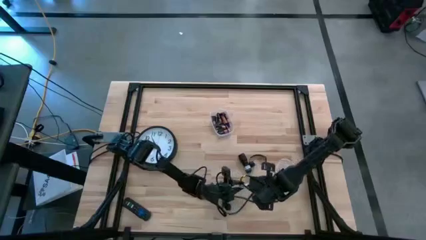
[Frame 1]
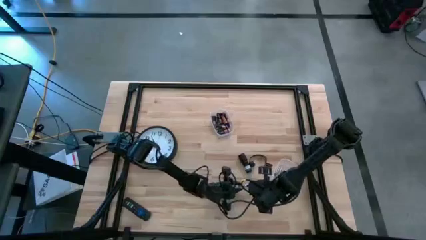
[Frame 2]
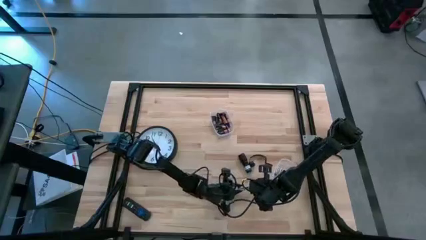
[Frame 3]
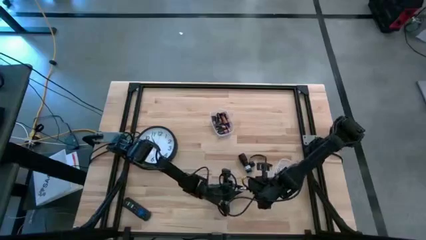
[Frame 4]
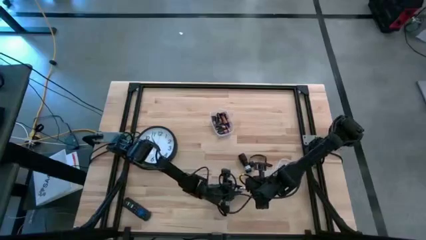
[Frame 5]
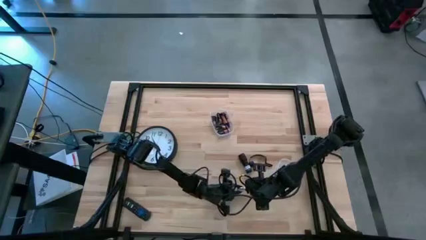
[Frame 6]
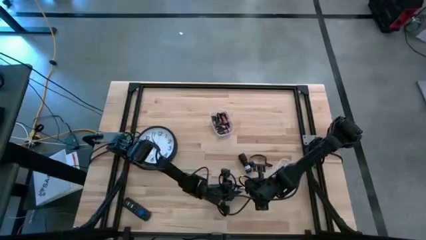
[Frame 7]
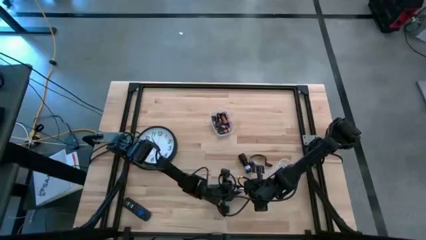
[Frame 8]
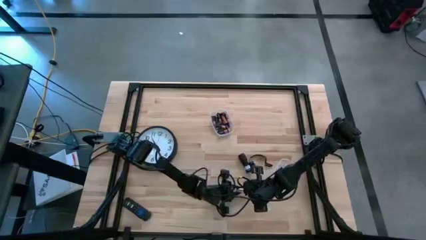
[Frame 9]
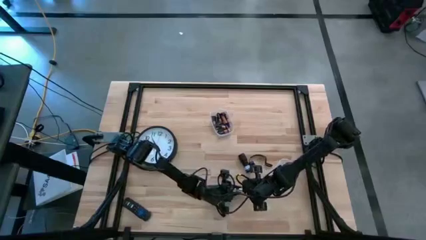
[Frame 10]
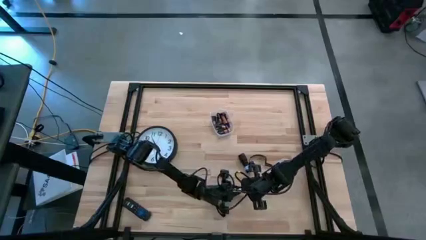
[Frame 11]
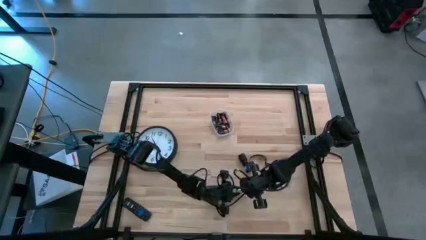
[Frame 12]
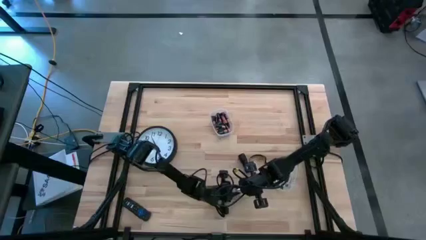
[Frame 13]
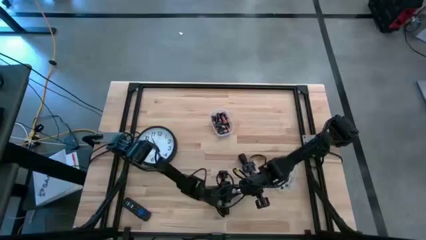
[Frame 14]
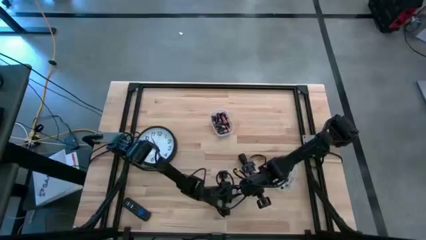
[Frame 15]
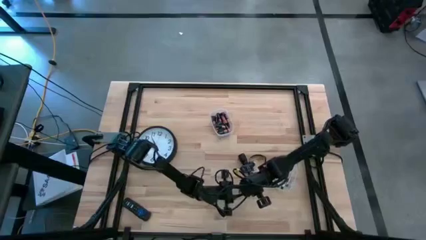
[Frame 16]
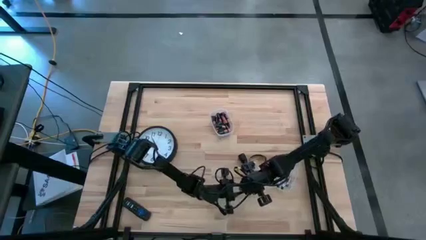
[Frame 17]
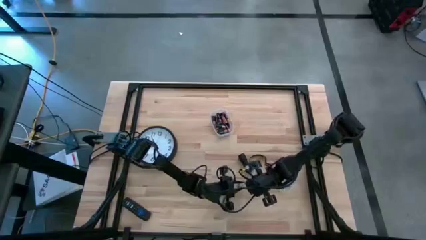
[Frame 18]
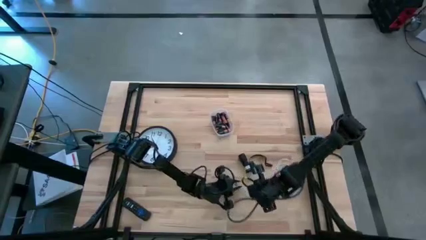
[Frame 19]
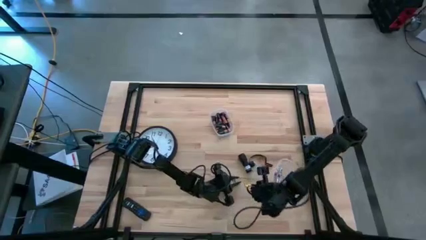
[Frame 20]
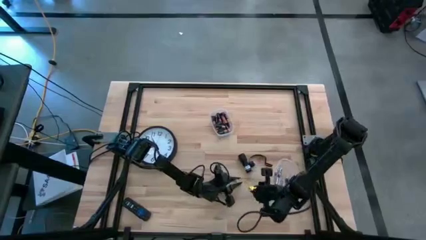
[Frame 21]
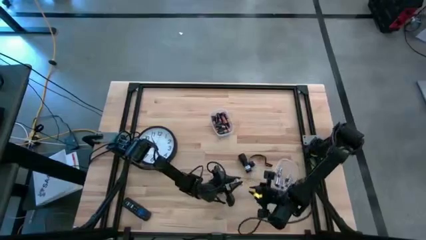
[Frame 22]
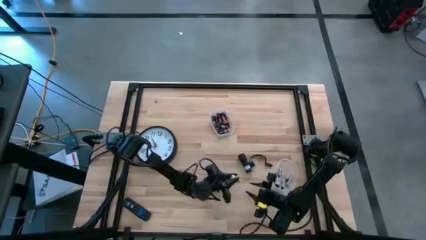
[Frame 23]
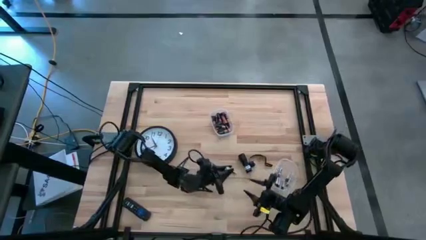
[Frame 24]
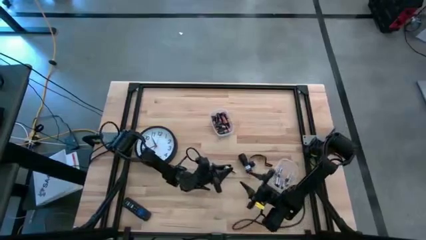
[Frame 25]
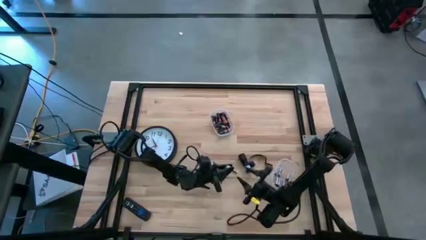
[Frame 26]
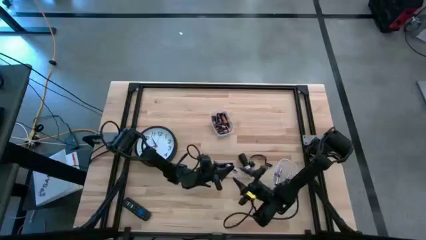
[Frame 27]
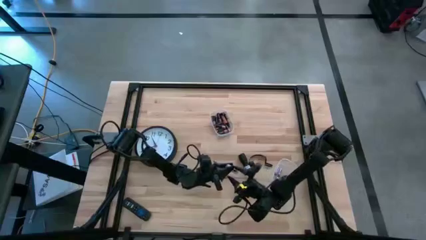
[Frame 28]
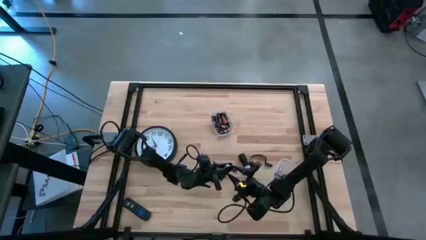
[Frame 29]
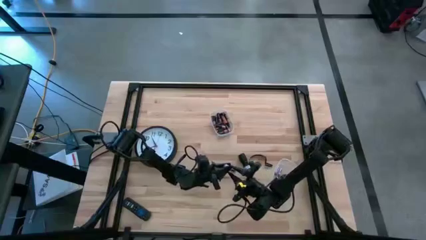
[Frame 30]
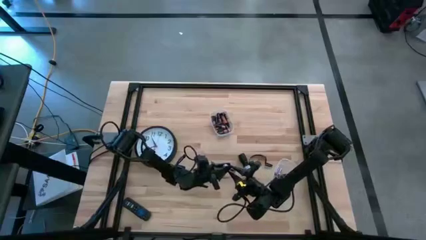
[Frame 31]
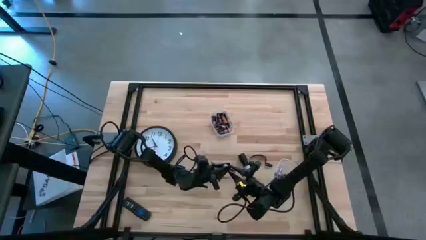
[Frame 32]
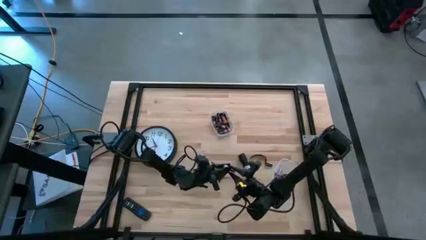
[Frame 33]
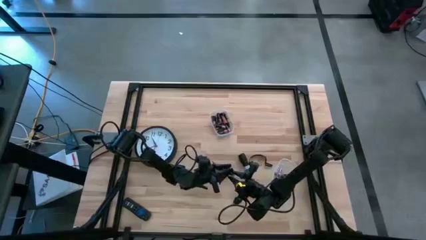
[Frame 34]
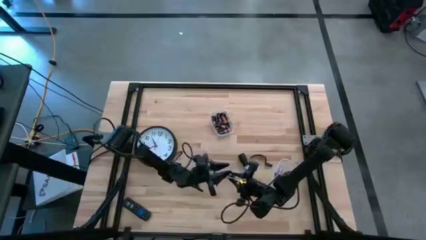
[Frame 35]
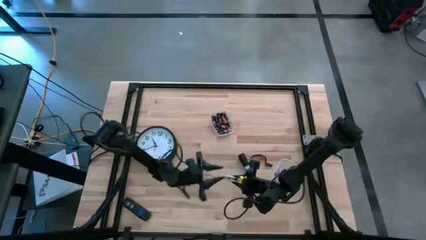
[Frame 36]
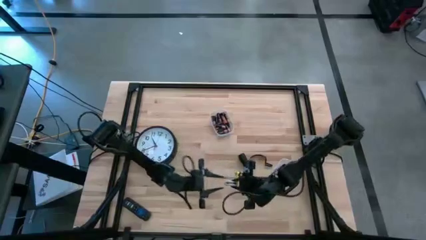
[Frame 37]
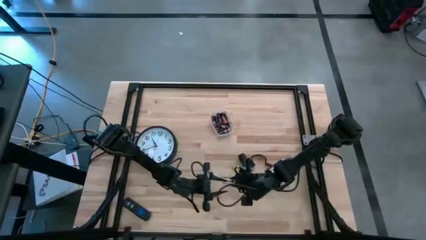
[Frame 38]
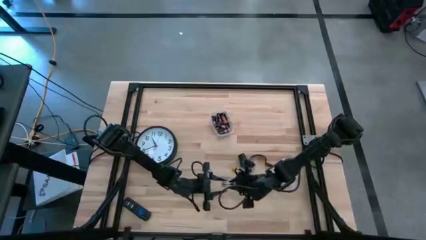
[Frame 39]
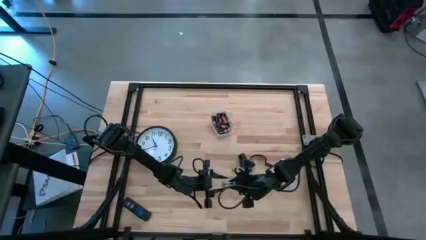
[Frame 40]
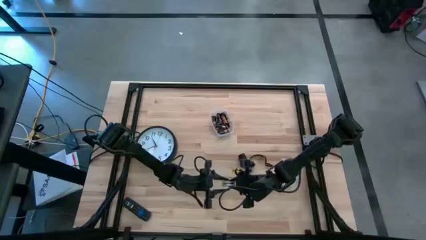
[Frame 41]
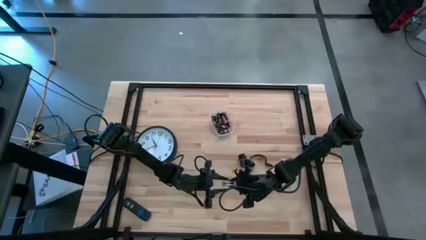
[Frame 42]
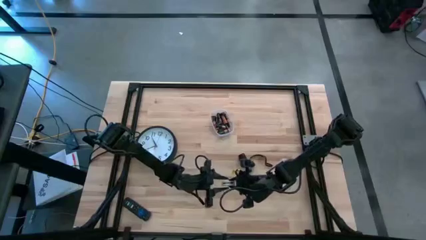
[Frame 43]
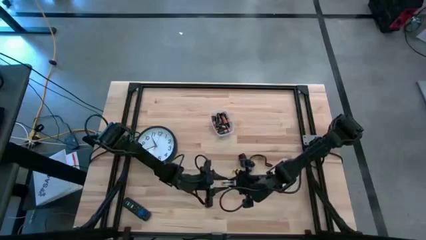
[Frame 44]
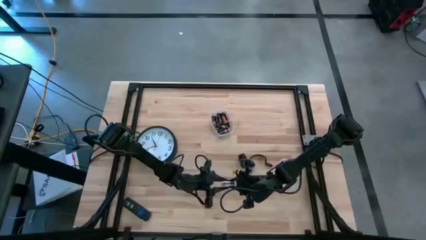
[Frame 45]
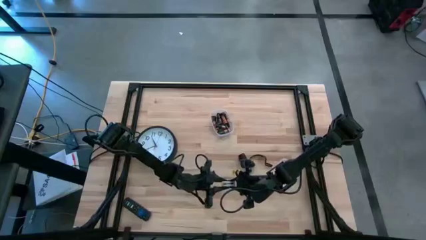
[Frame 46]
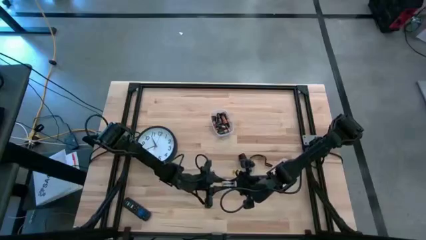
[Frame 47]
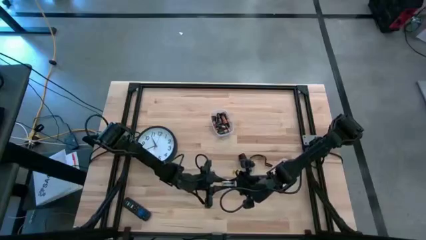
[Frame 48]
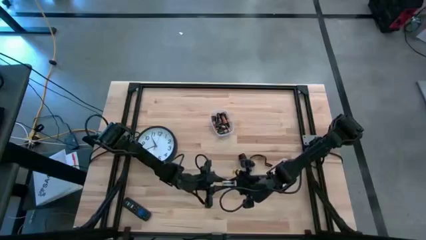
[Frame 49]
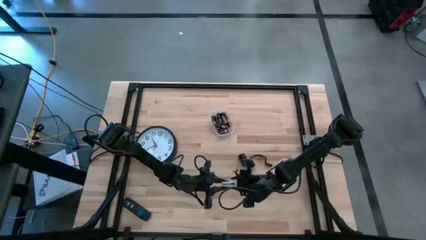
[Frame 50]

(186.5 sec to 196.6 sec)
Task: Insert battery
Insert the silver battery into the battery holder

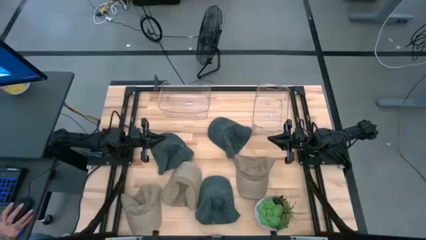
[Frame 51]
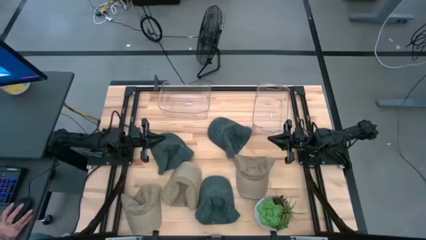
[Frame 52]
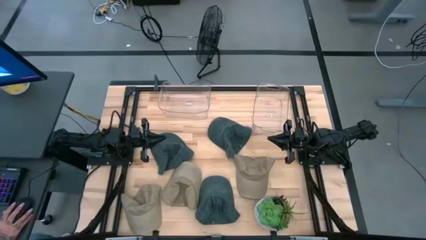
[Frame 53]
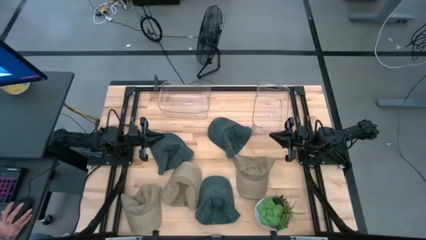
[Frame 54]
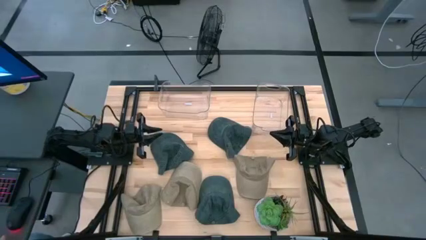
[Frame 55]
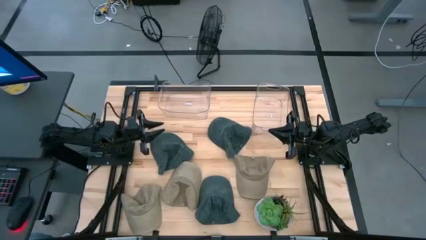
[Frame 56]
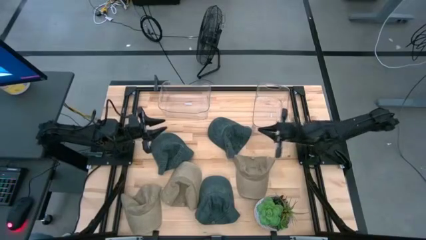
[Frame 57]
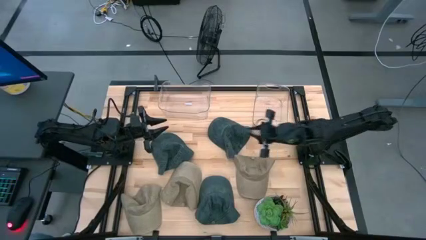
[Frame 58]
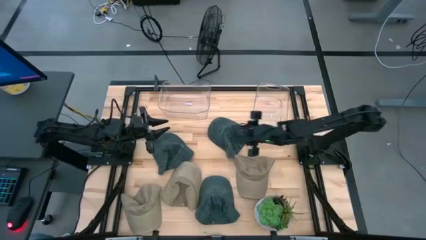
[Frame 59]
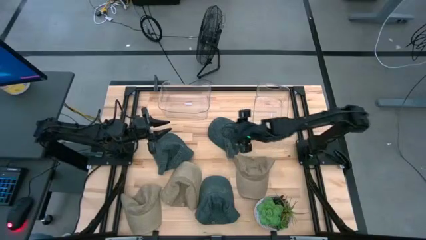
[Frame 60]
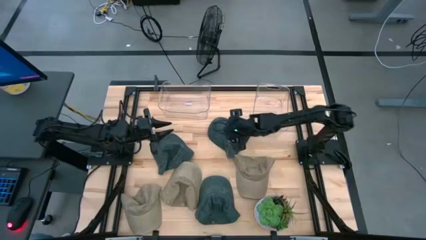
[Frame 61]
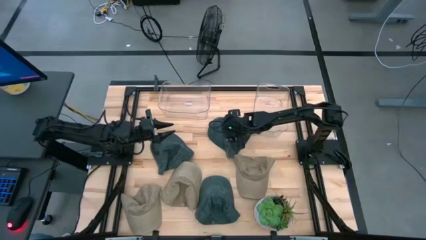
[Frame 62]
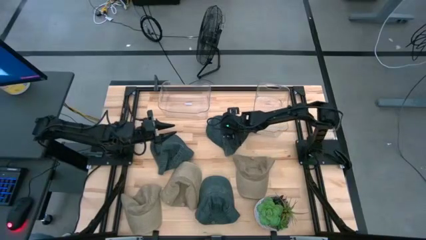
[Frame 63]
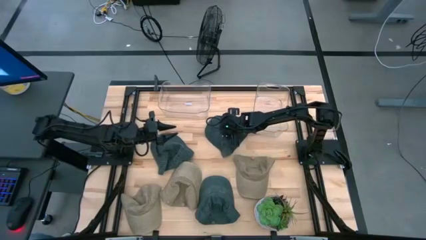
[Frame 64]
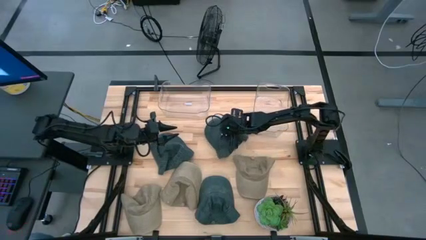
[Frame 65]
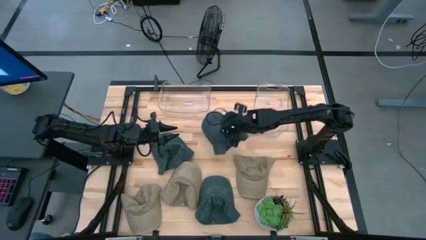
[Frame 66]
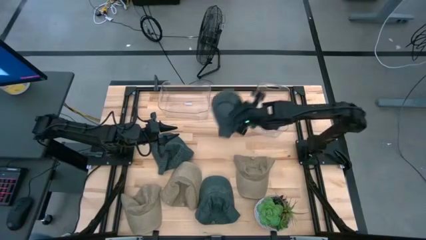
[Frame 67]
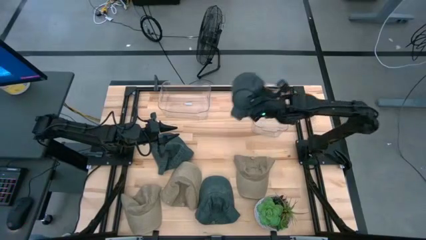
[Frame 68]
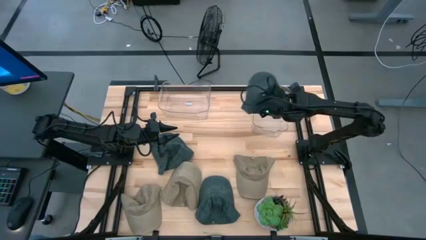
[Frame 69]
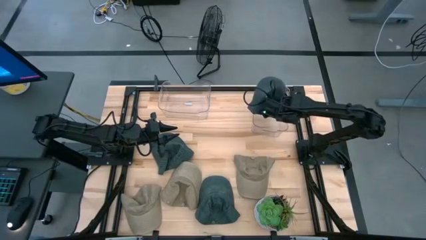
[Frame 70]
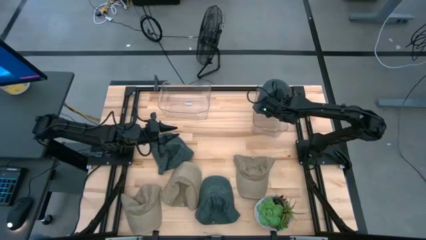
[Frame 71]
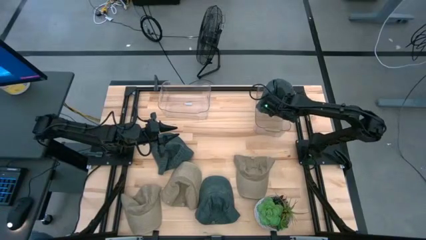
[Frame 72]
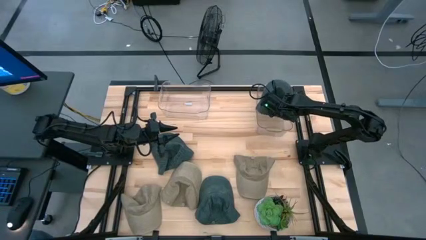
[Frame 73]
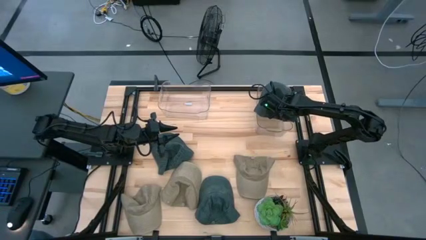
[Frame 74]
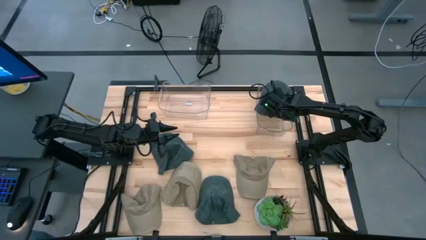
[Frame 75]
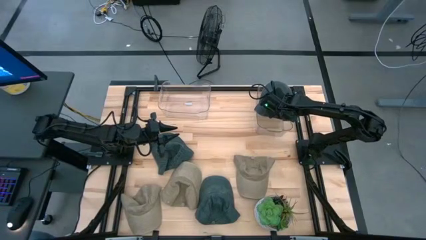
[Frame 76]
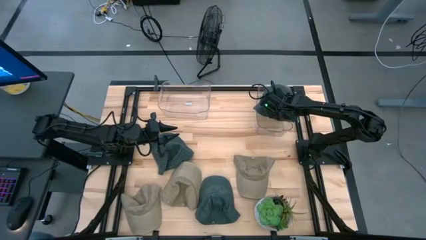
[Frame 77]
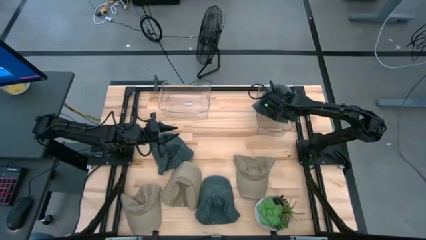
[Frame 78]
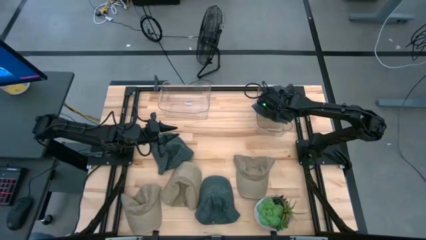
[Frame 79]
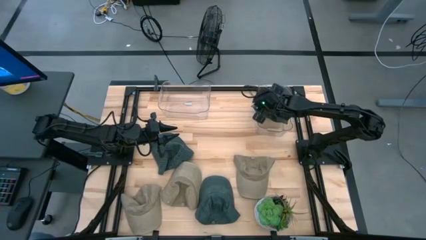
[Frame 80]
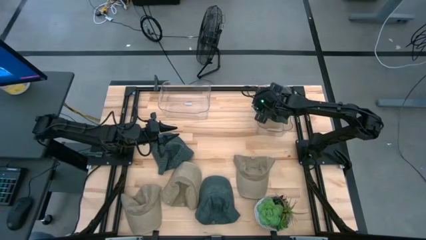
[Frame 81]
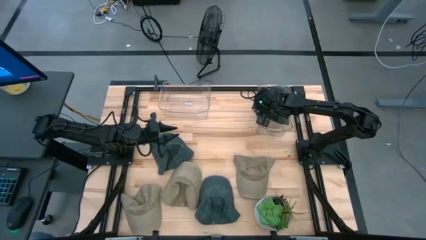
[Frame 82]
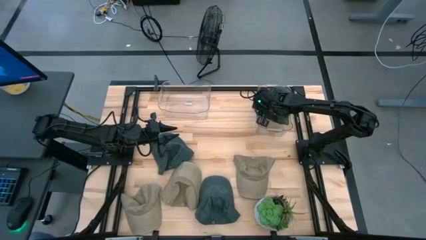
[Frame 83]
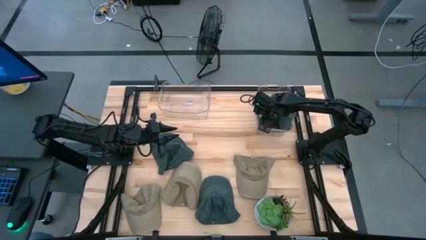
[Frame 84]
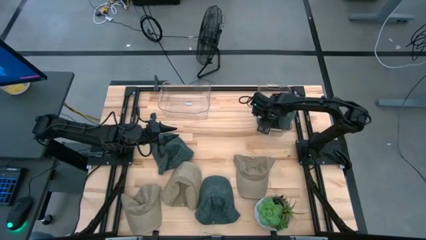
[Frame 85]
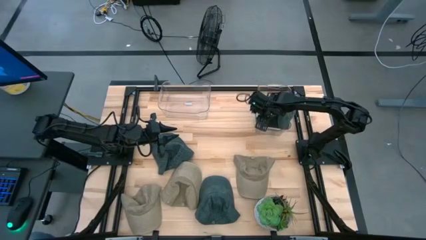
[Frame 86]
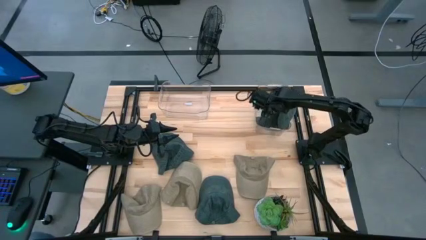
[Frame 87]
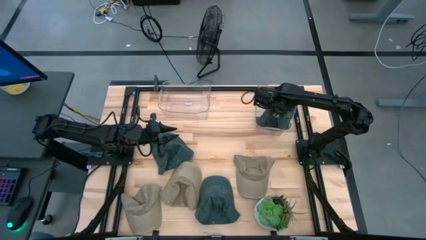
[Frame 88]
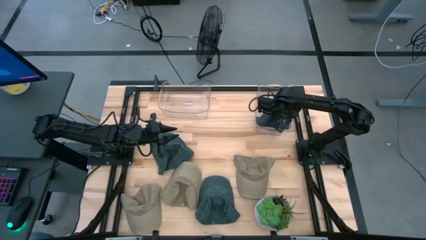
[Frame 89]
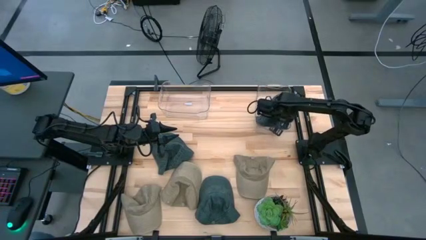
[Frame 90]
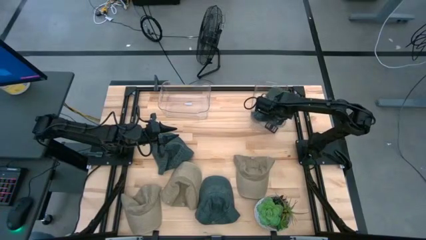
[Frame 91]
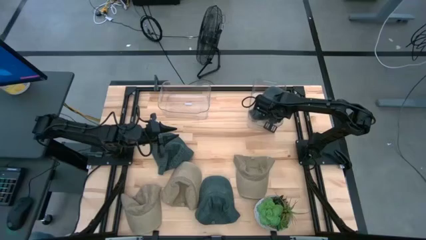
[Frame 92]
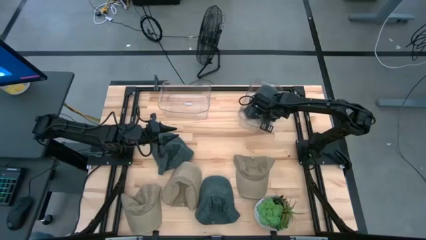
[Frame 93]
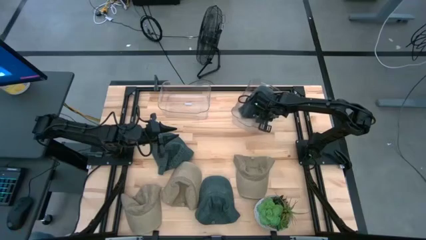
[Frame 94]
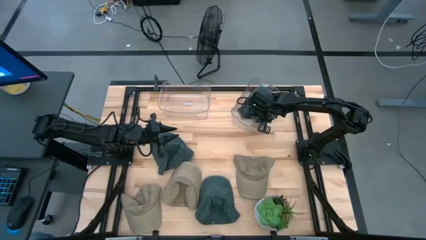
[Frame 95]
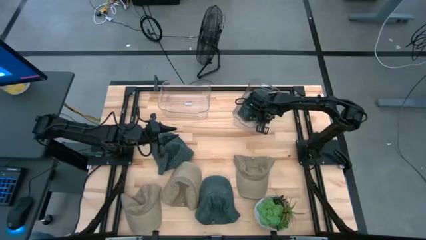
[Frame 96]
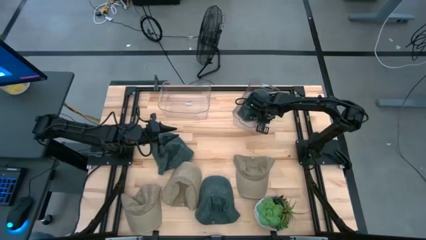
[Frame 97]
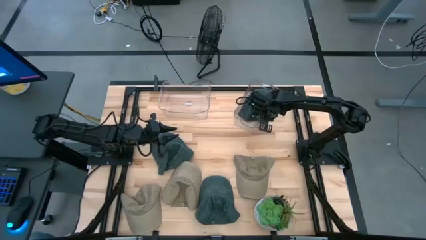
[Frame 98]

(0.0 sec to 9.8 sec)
Task: Pick & Place hat
Put the top right black cap into the right transparent bin
